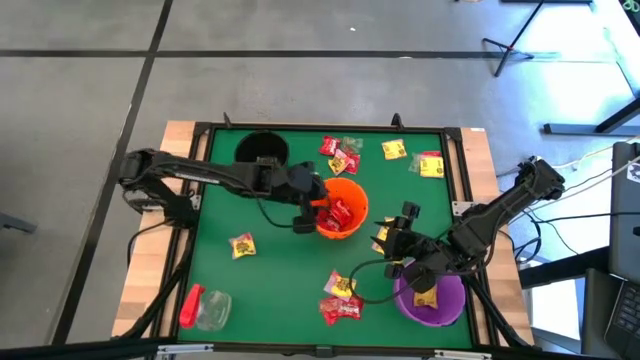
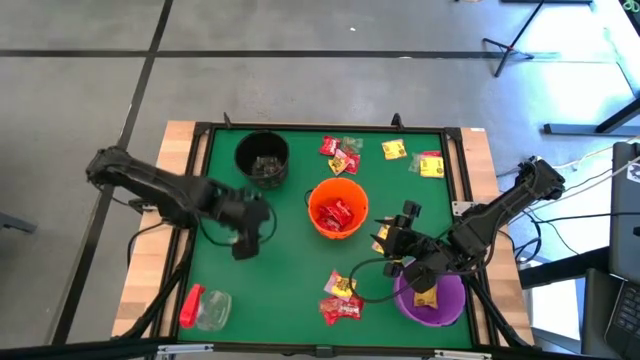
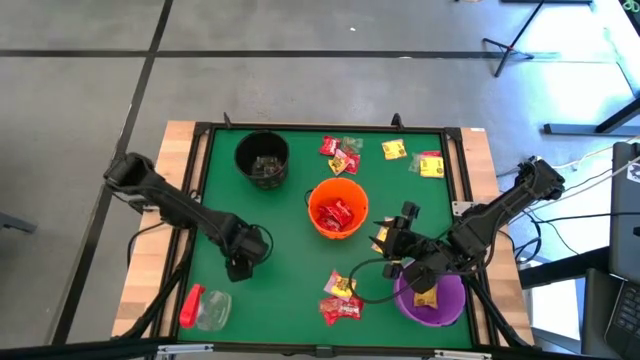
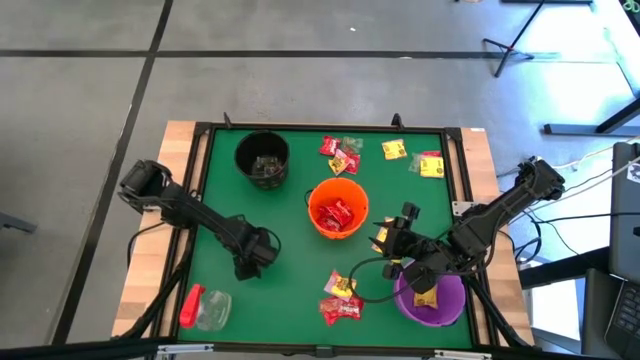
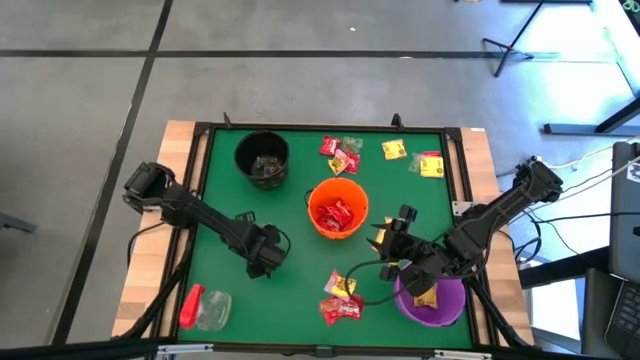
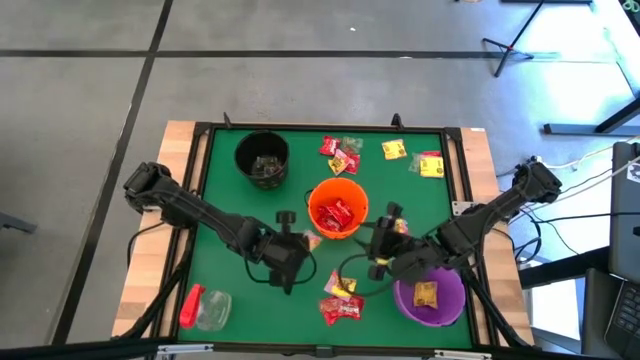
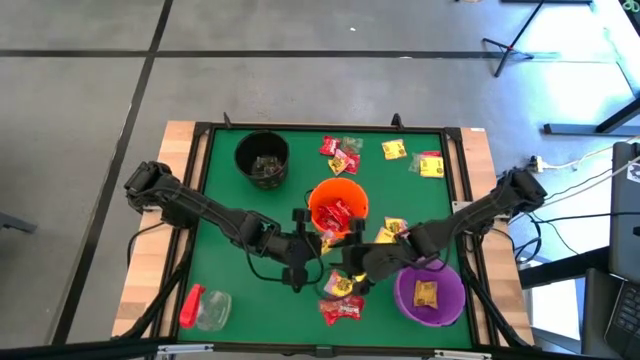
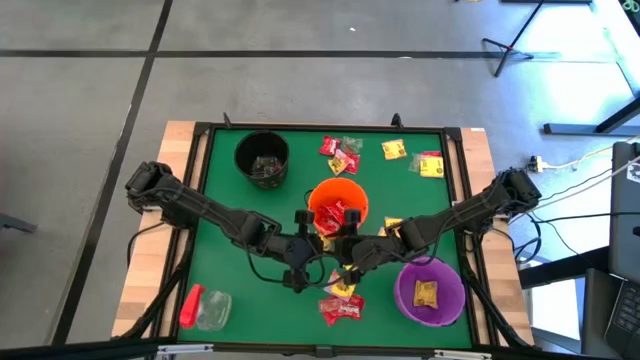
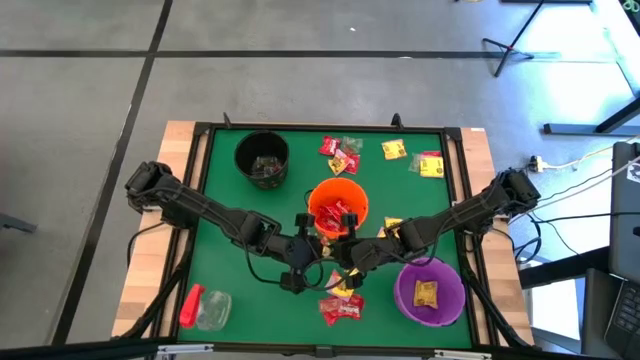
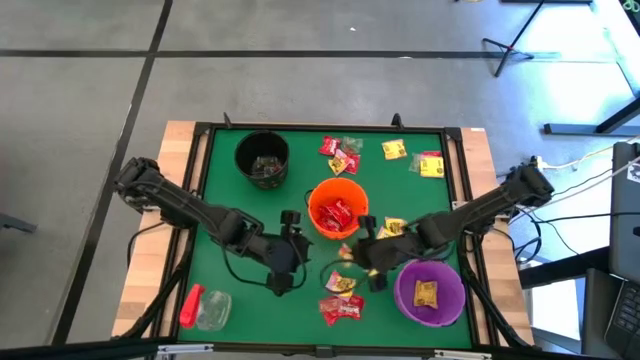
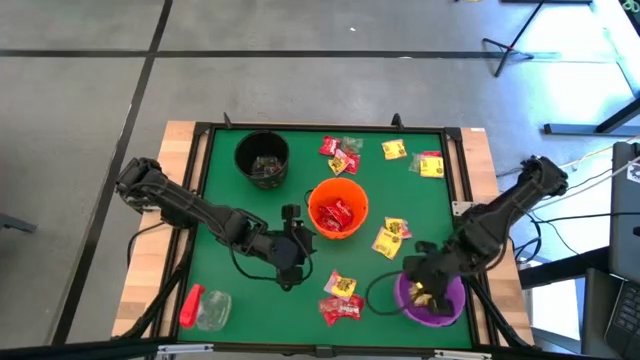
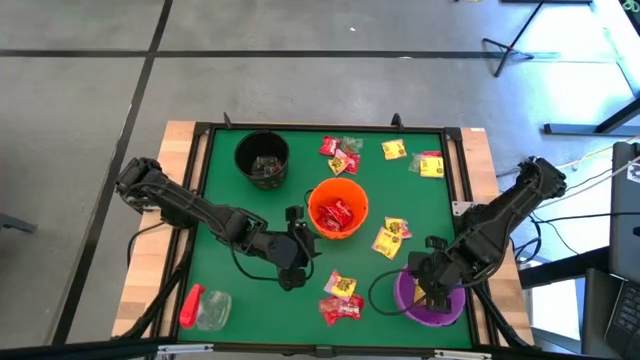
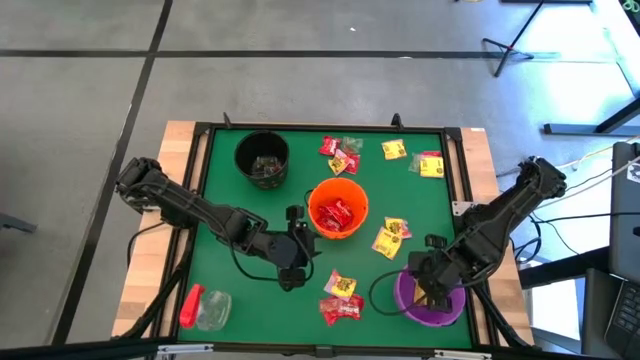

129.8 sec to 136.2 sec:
Task: Sort candy
Put the yellow candy into the purple bin

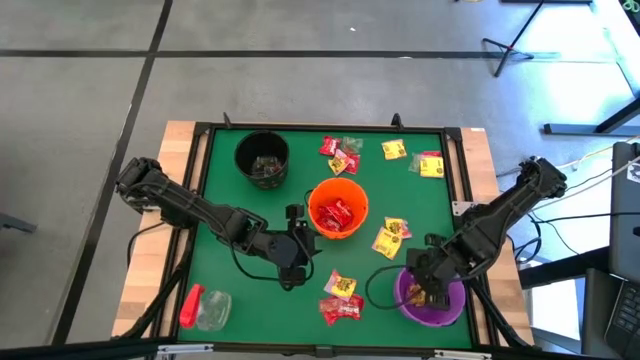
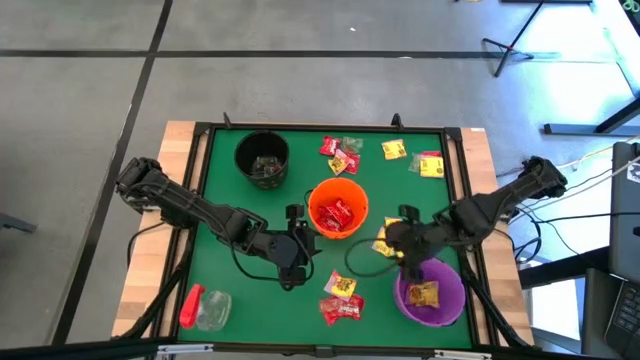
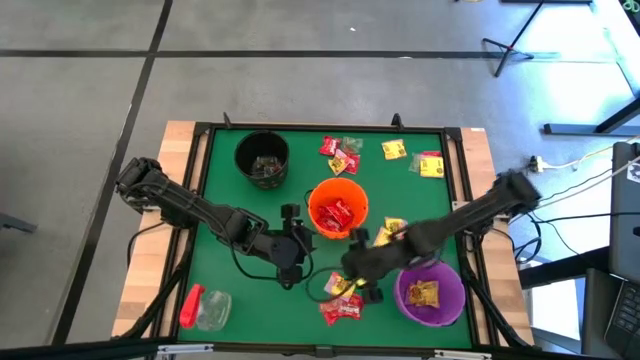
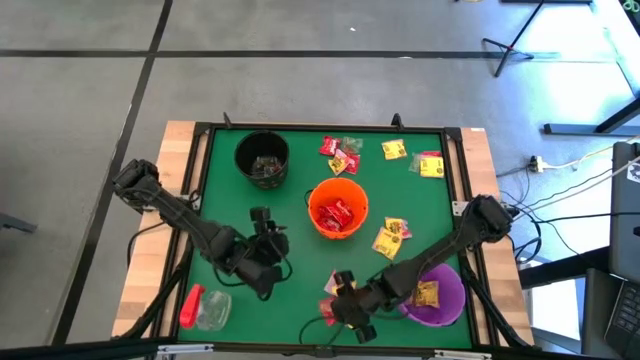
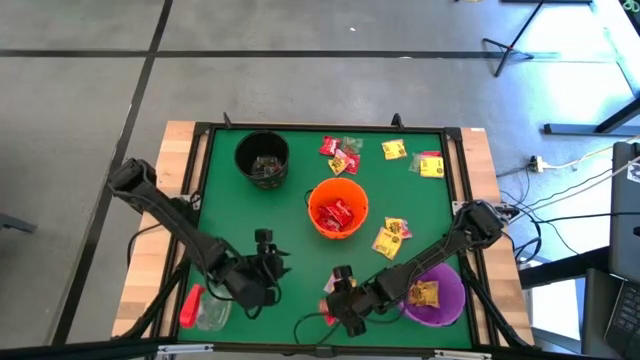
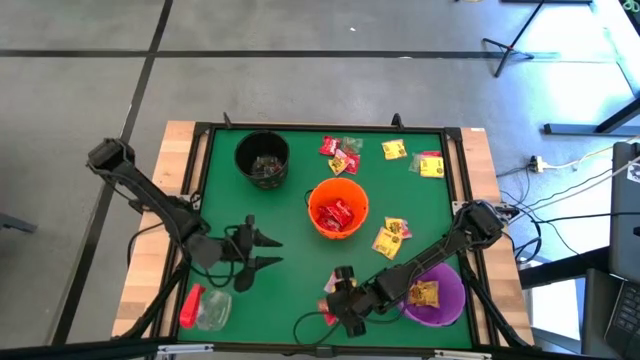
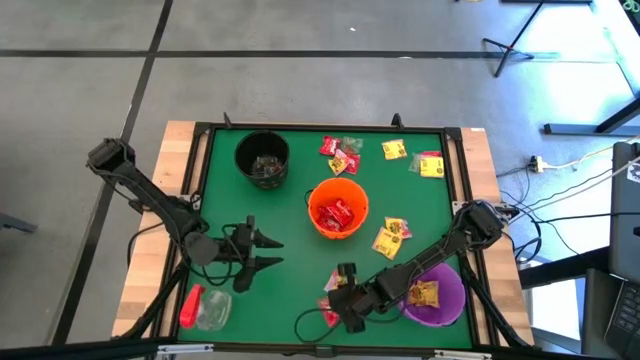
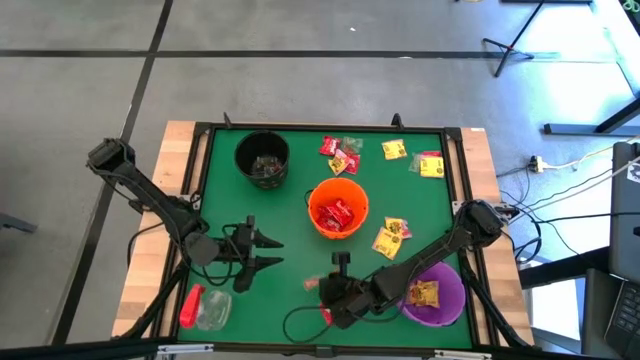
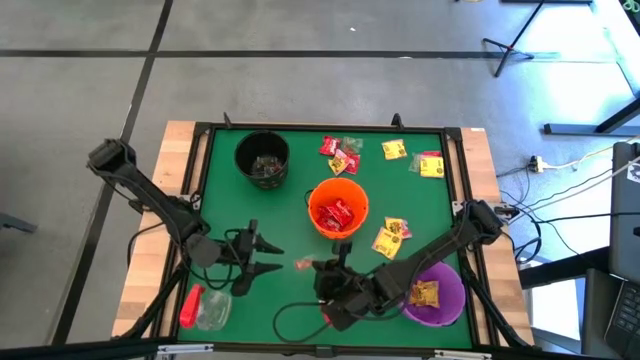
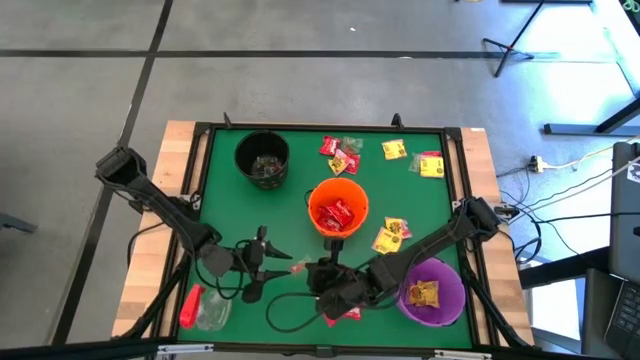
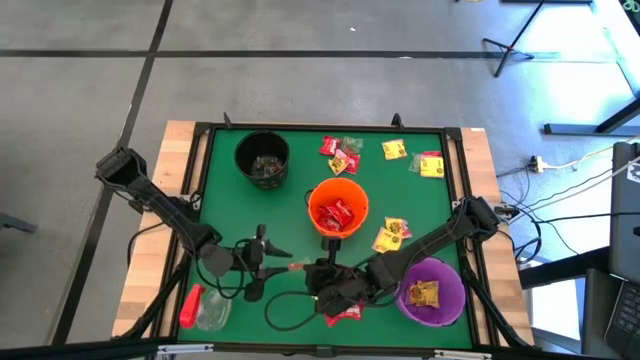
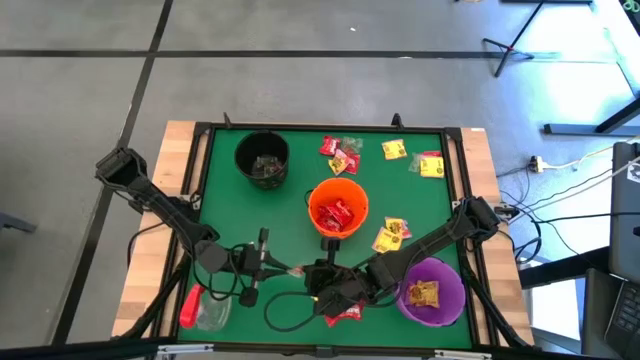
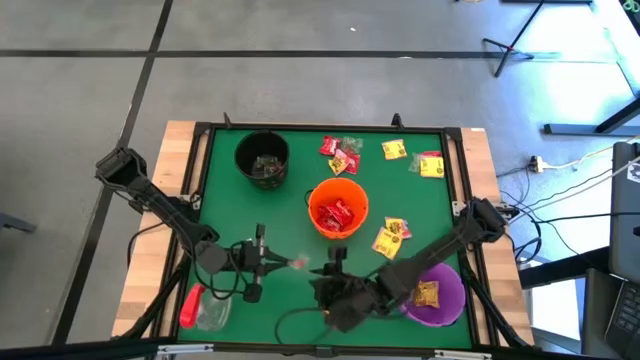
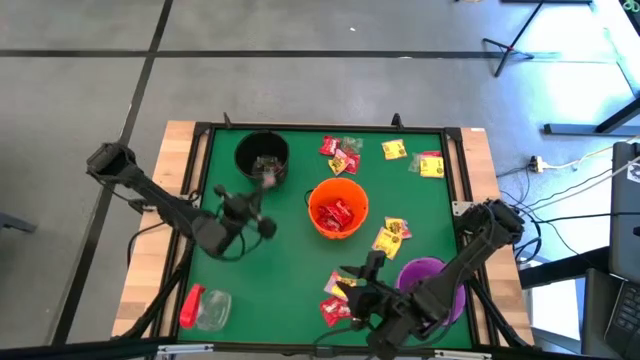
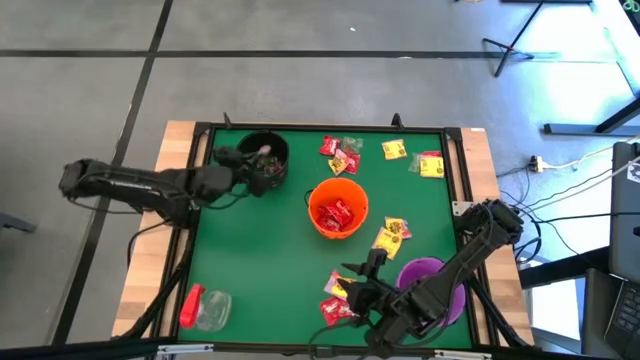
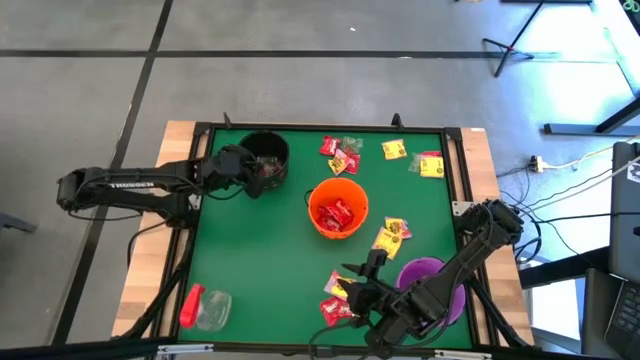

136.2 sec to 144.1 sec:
Put the orange candy into the black bin

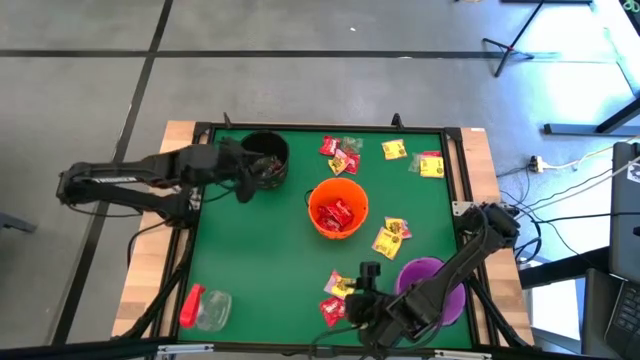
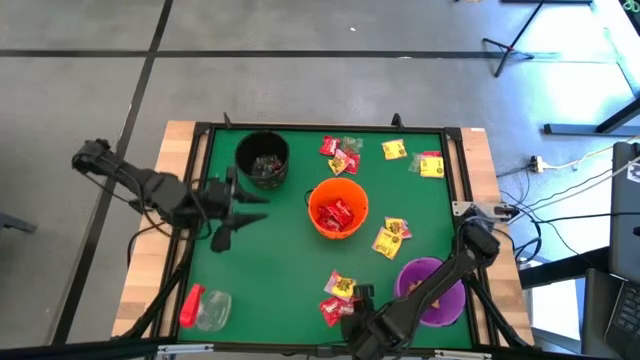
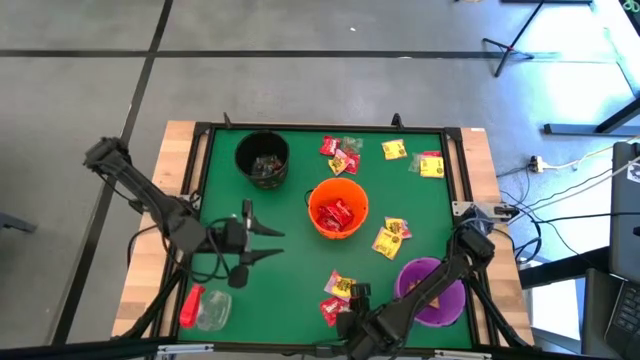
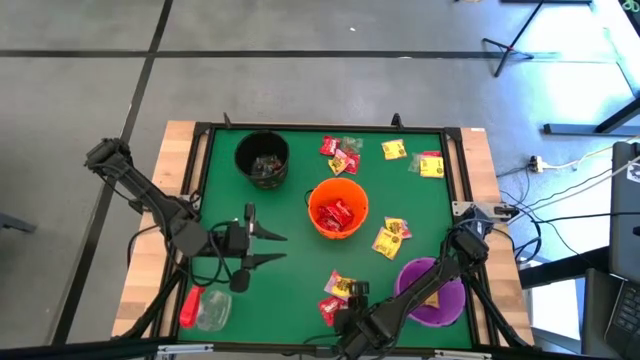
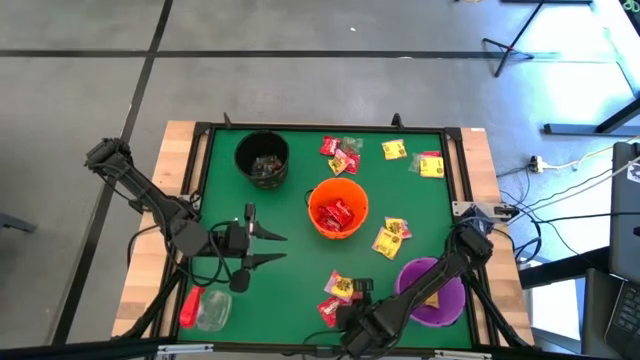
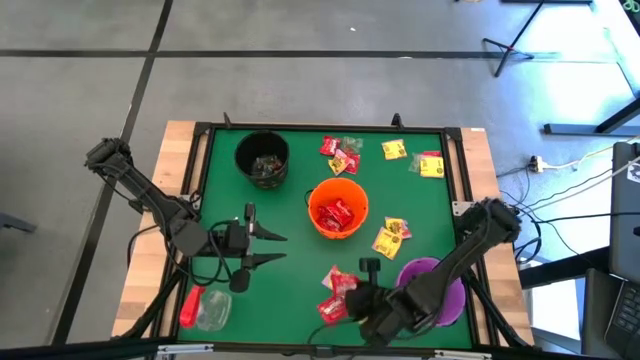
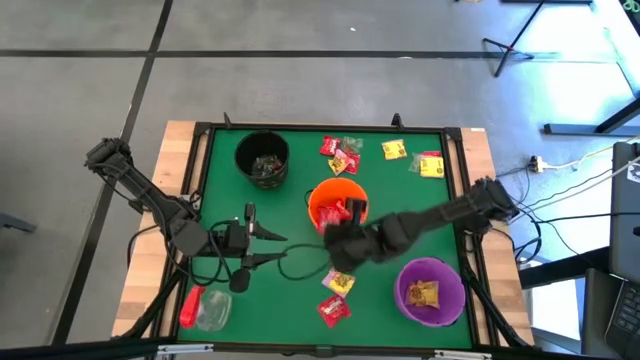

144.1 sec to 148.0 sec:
Put the red candy into the orange bin

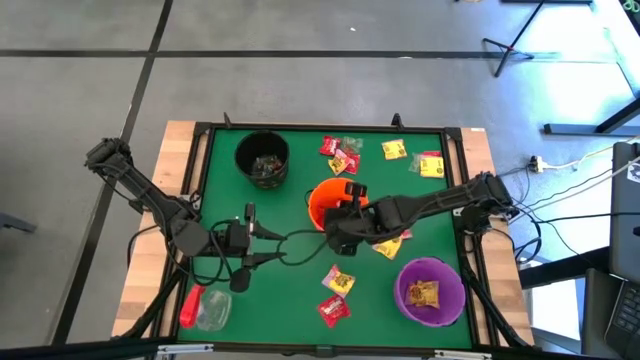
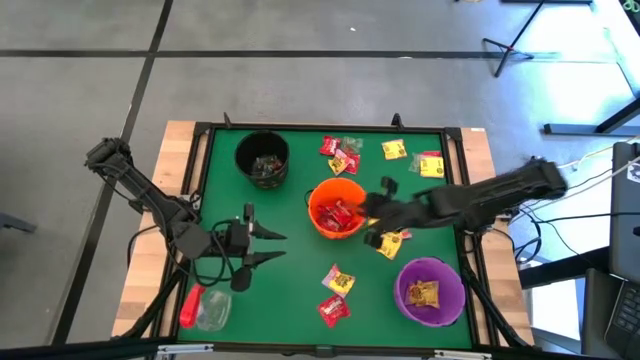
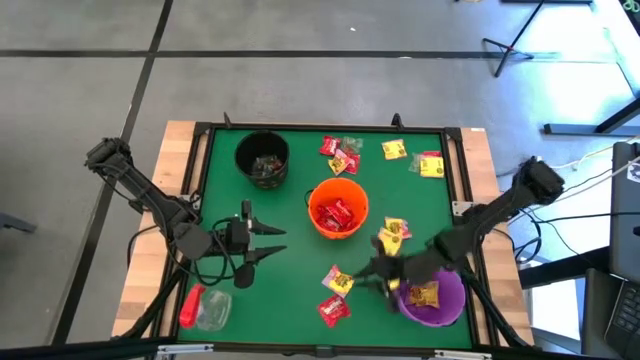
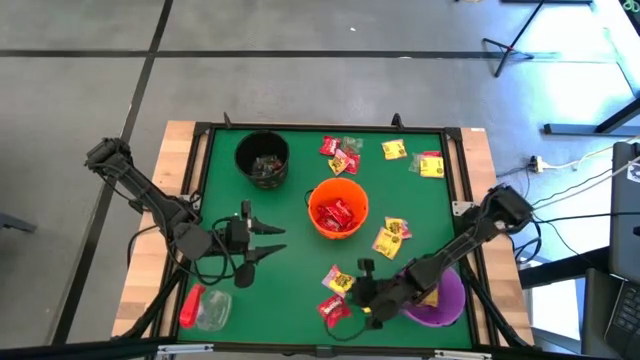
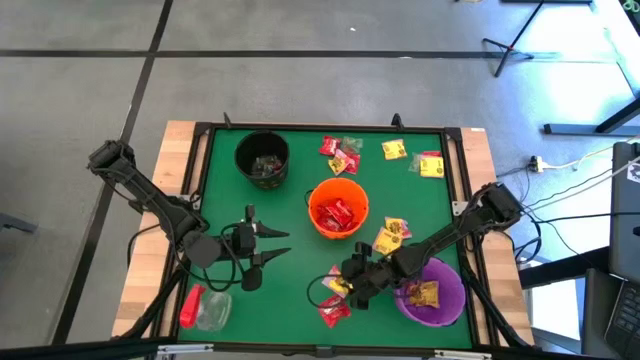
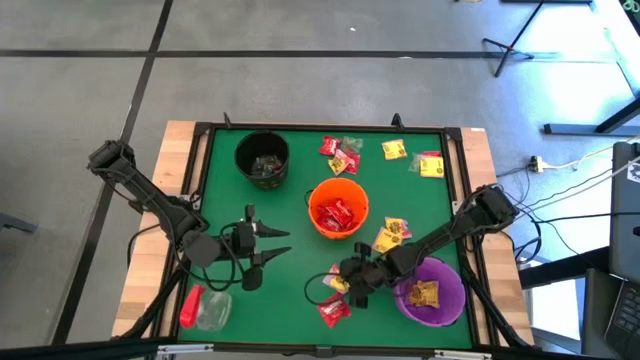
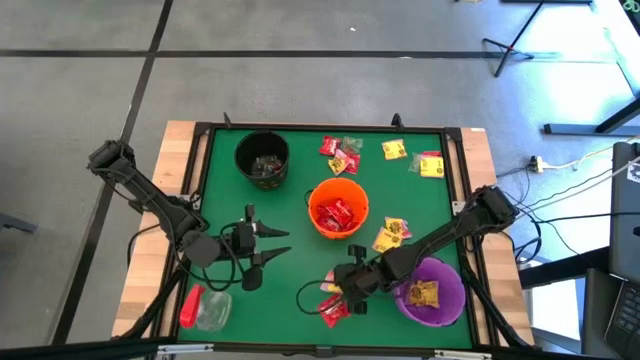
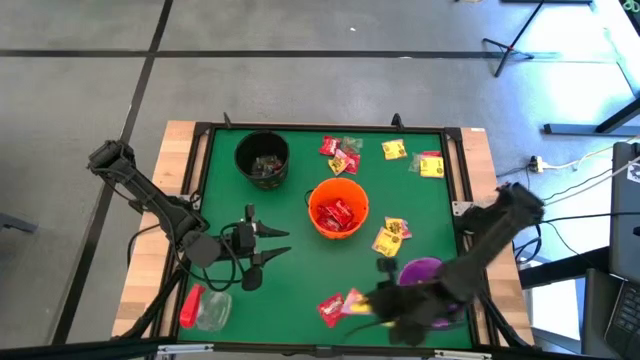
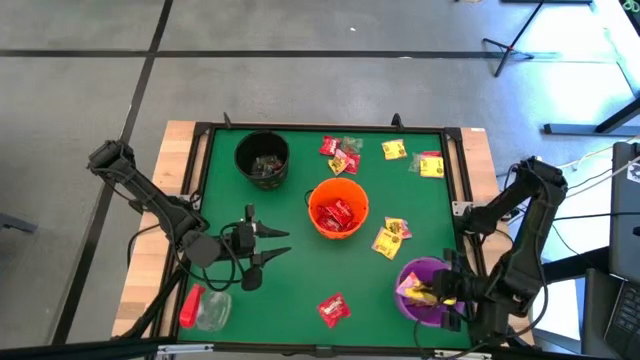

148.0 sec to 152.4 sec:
Put the yellow candy into the purple bin
